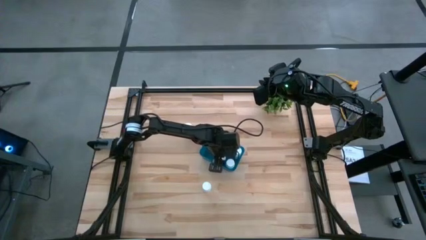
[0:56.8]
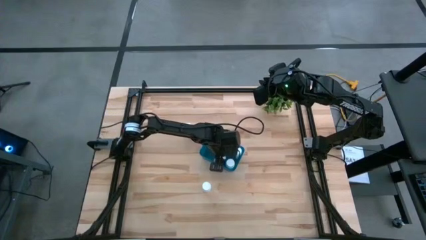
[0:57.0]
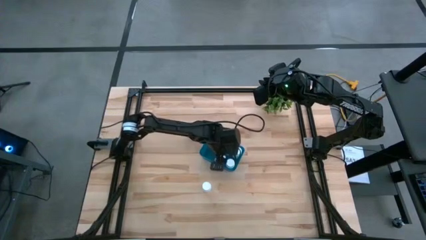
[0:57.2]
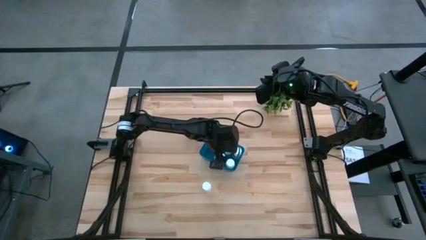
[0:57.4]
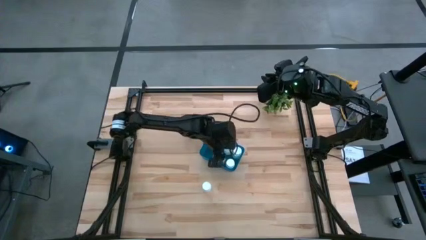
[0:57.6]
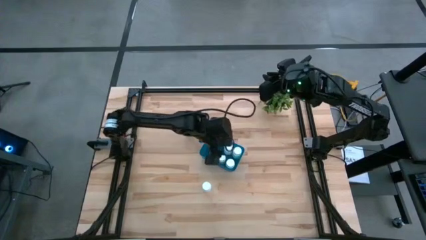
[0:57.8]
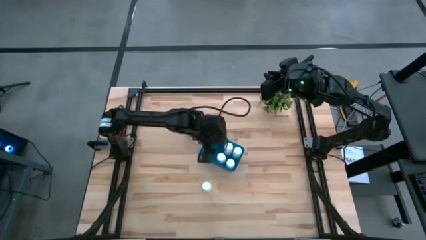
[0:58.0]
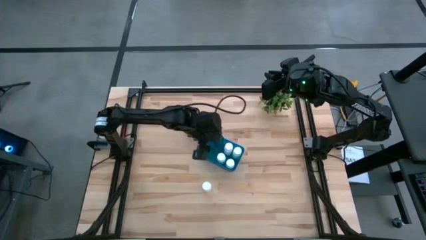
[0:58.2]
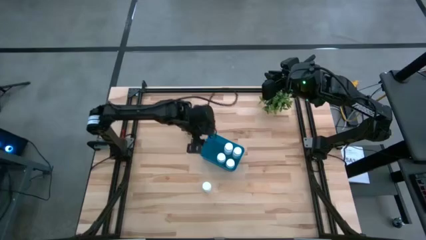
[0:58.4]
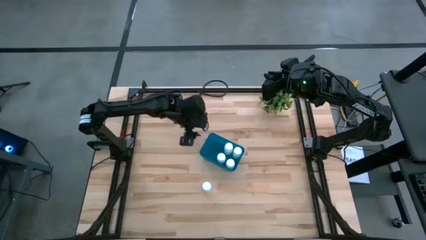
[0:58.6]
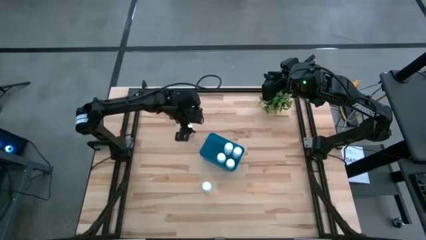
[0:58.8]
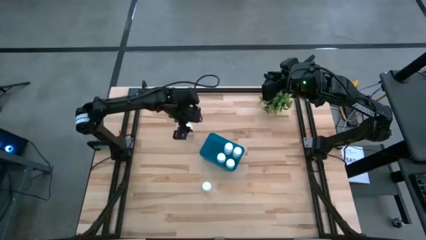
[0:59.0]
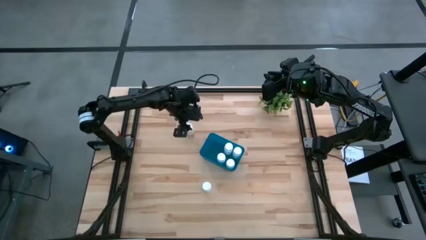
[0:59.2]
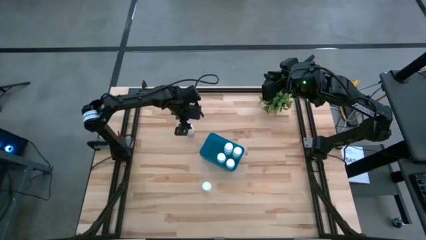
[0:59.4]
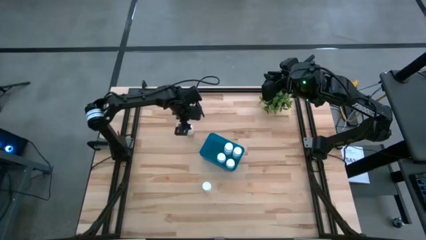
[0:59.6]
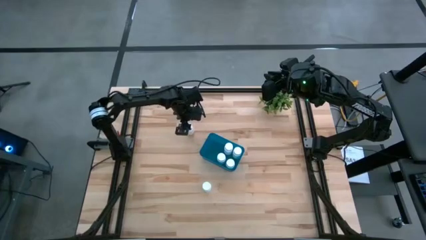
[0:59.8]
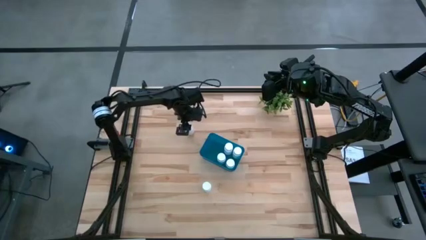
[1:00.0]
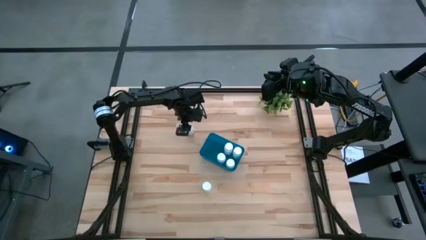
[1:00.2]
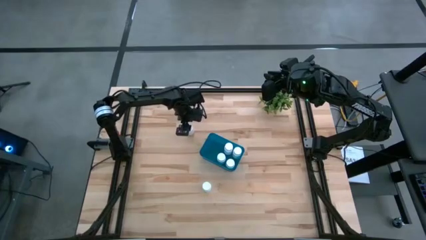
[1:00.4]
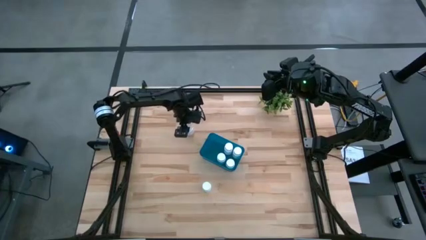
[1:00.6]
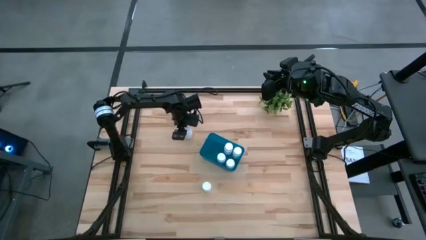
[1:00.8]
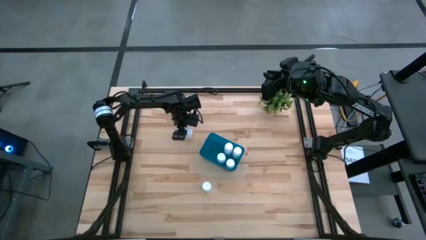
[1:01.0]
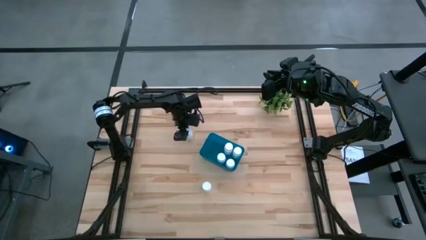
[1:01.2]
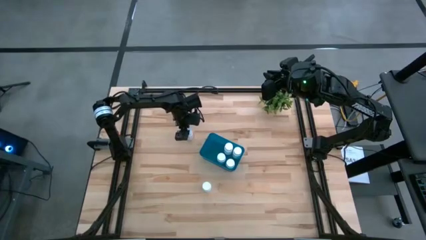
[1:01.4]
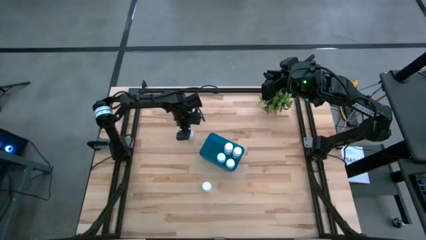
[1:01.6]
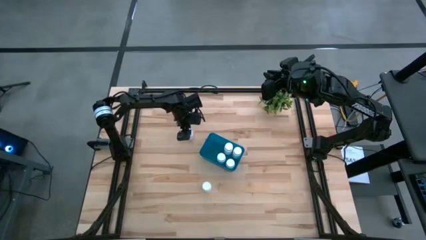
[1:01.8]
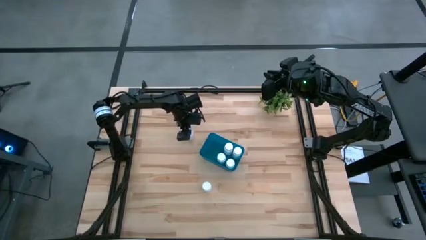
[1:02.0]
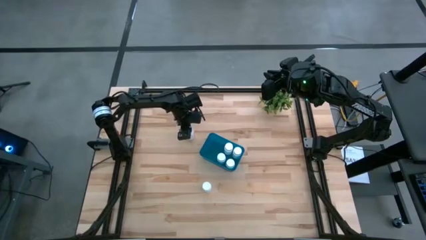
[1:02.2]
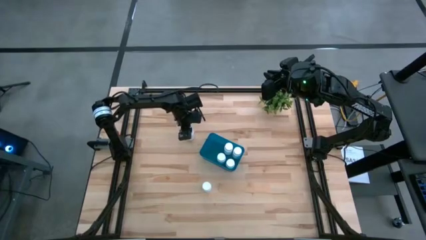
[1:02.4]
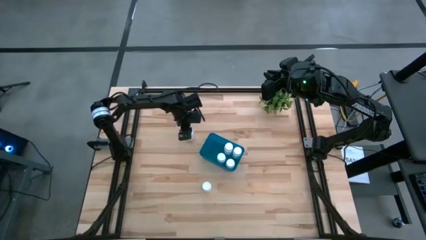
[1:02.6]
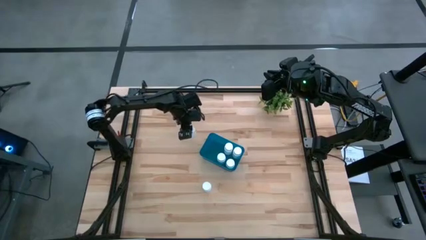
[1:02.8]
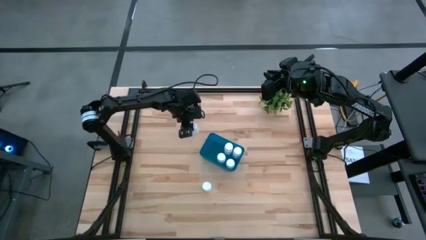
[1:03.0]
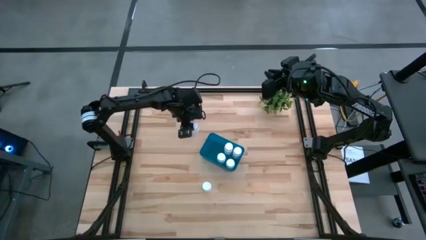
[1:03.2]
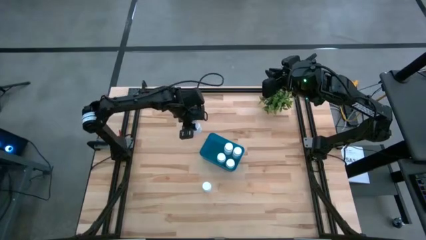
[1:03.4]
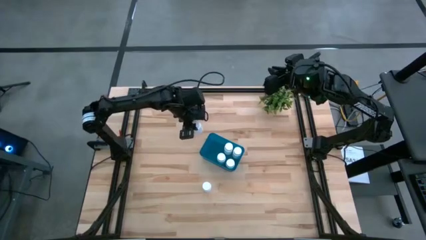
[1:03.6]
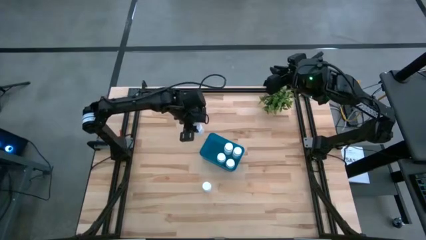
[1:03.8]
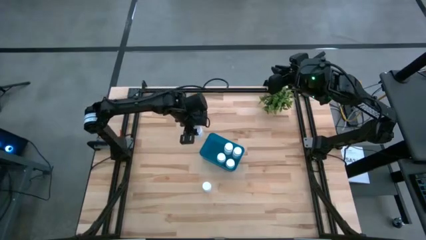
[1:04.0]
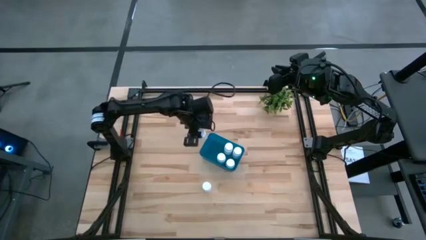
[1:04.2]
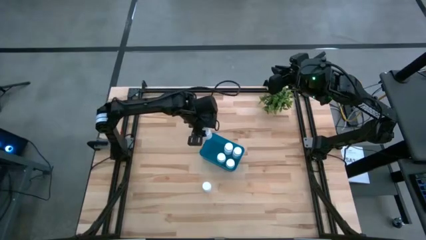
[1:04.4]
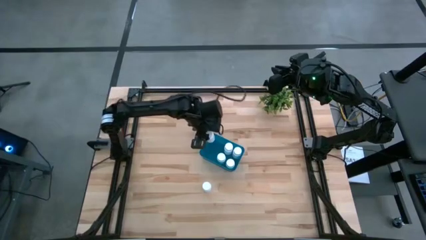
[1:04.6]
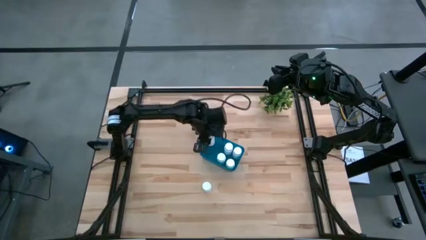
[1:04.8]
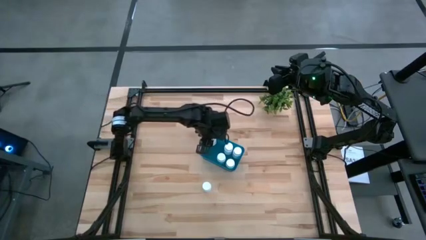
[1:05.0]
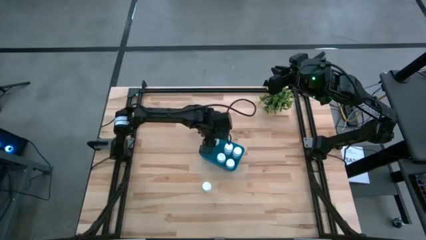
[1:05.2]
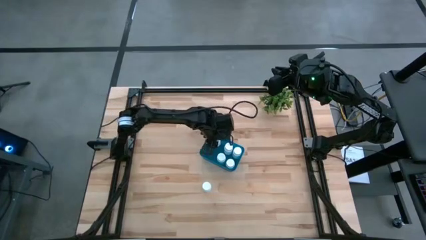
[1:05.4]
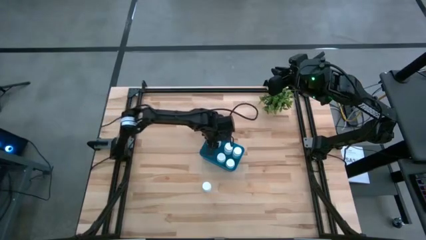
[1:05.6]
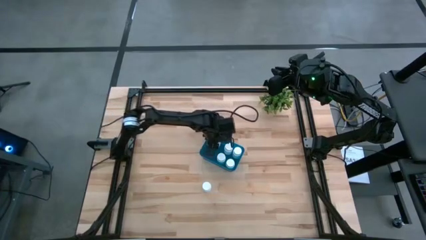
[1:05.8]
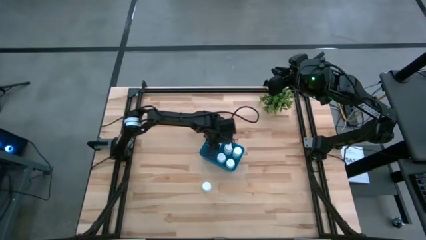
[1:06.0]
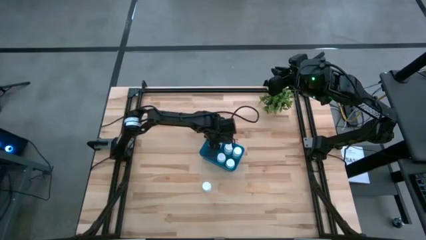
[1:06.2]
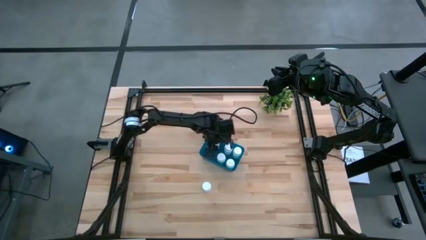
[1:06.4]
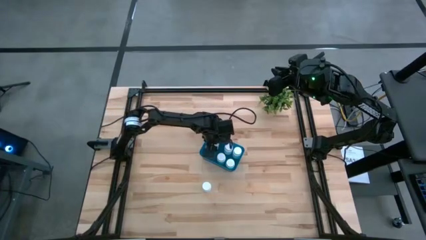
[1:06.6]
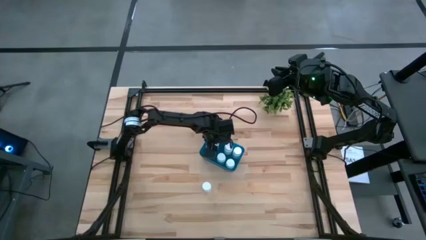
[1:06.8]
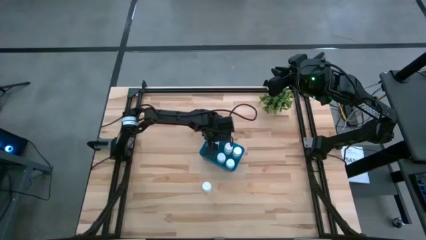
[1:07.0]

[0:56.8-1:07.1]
Task: Pick and place pill bottles into a basket
Put the white pill bottle into the blue bin

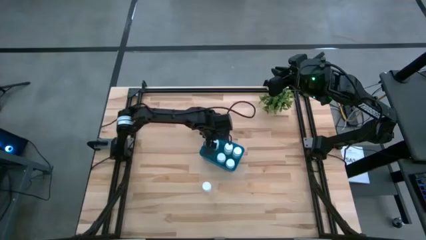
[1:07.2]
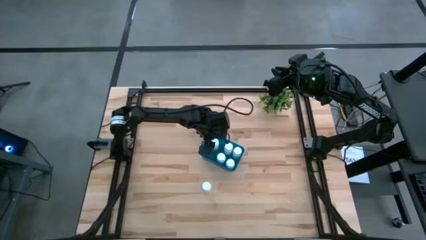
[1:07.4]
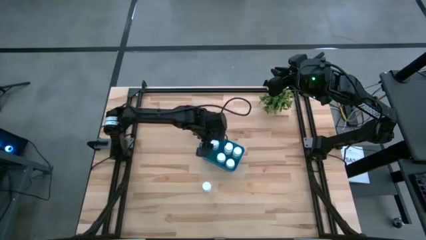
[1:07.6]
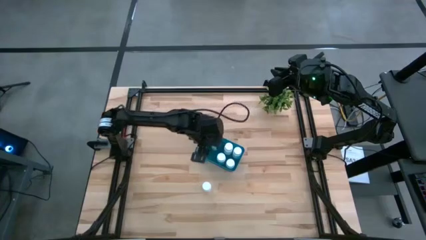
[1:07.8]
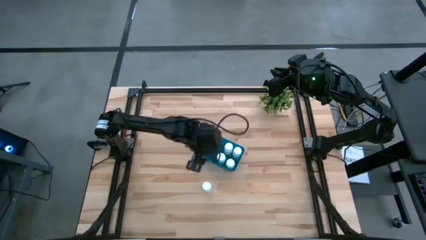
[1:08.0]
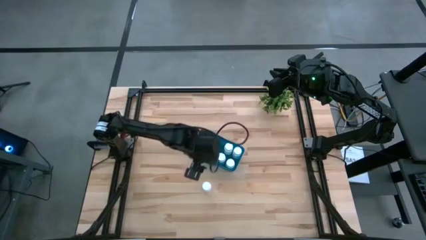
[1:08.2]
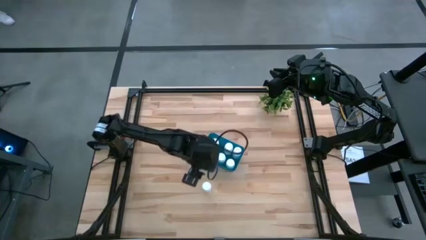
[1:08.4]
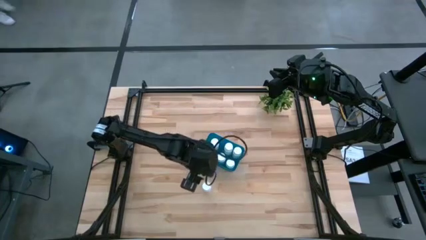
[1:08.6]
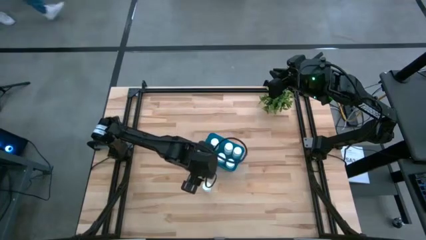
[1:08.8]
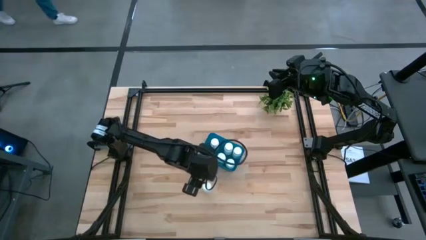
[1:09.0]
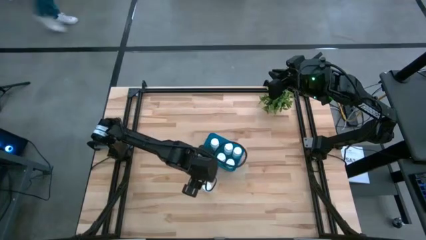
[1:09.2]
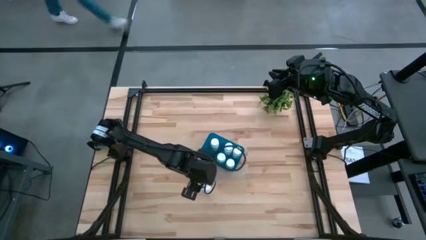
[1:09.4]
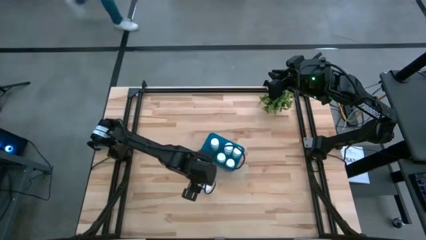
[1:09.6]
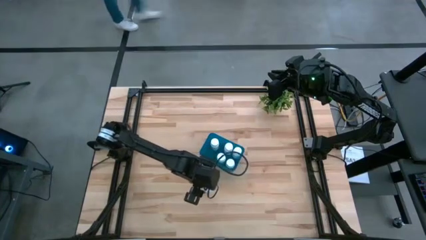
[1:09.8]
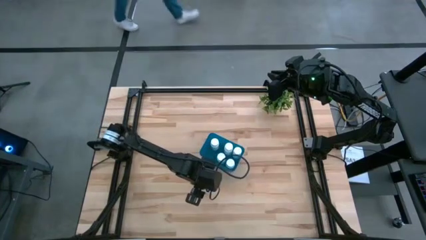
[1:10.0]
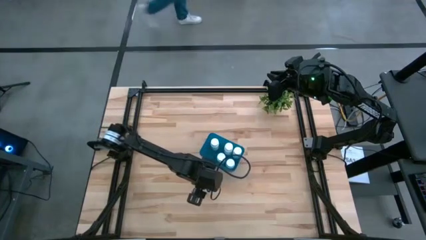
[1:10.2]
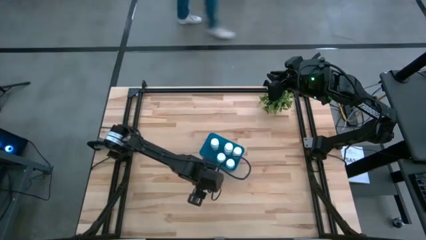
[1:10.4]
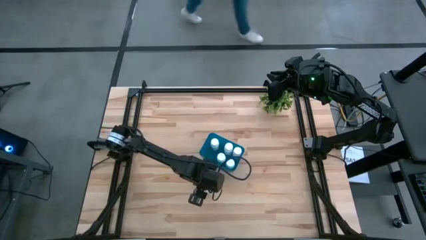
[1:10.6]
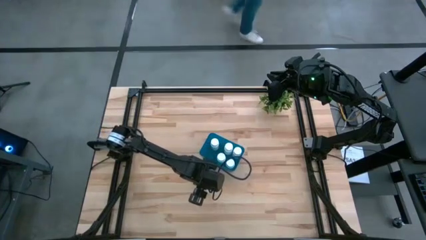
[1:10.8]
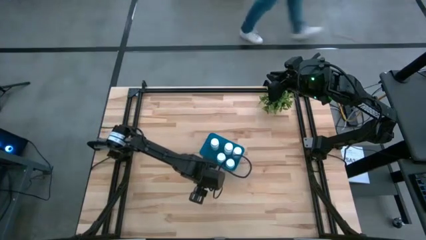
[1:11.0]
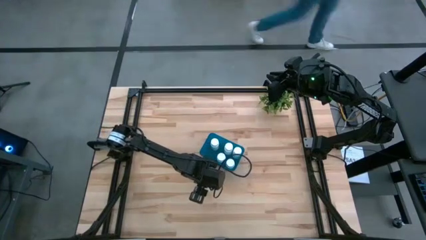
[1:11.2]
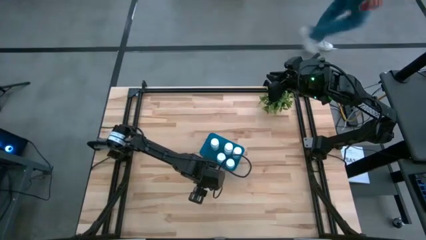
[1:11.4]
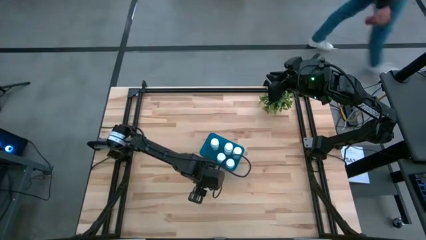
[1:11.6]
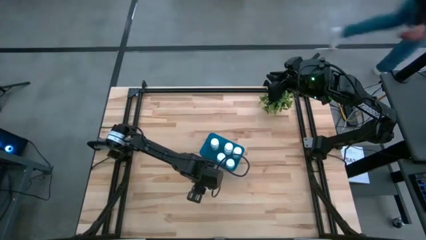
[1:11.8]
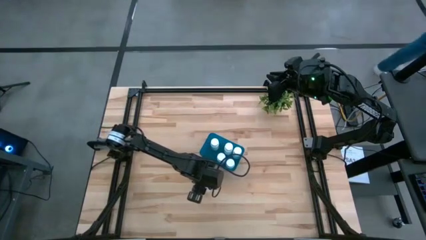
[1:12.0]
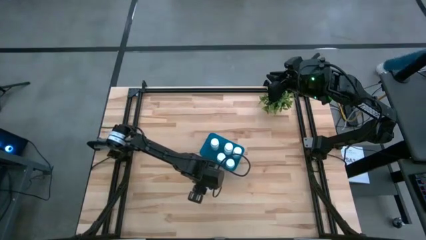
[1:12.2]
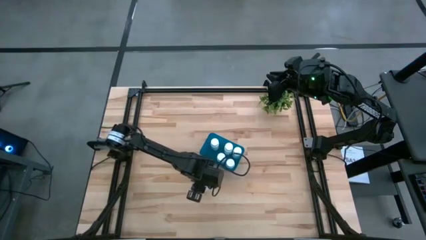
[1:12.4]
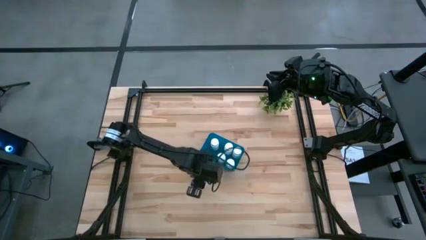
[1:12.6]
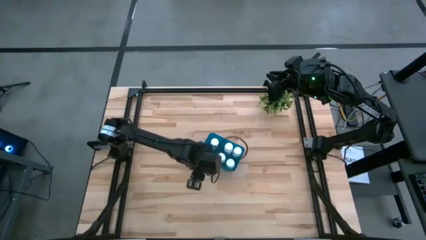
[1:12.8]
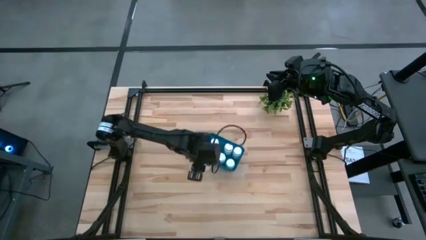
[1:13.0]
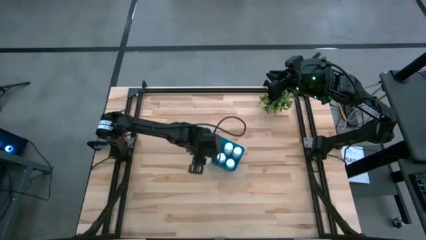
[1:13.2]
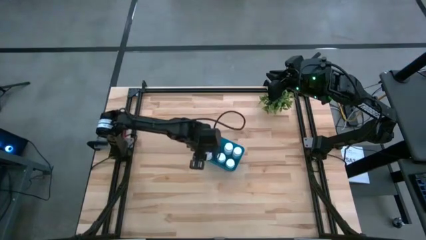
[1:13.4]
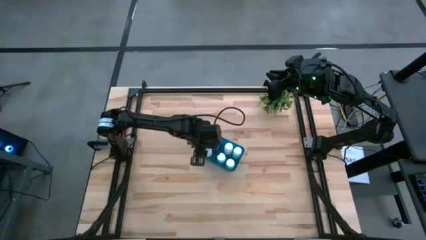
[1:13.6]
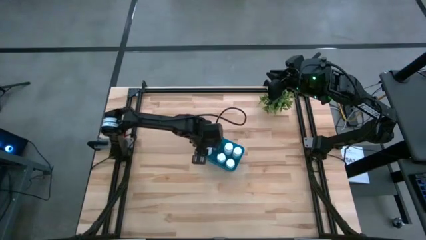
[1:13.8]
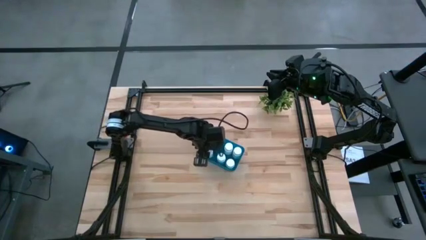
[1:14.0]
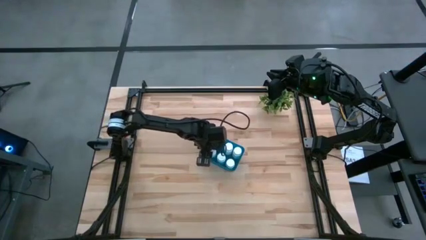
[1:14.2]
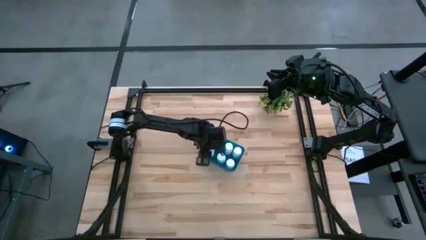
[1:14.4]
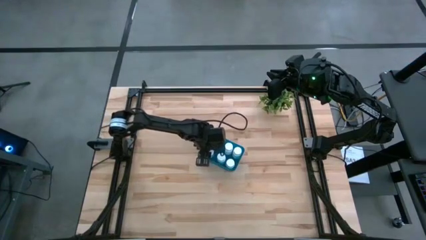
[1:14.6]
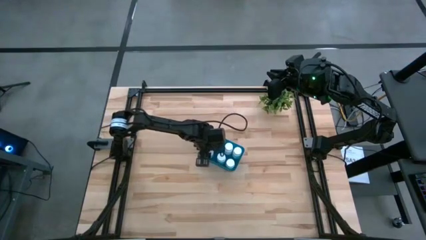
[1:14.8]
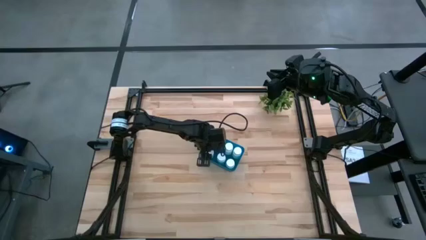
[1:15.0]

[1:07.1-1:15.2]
Put the white pill bottle into the blue bin
